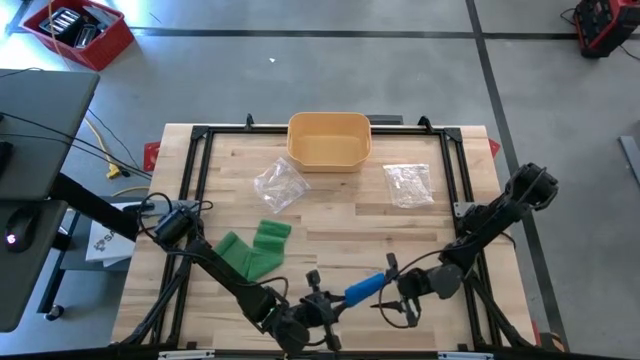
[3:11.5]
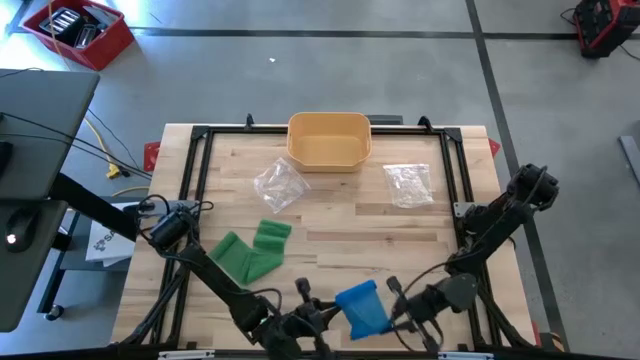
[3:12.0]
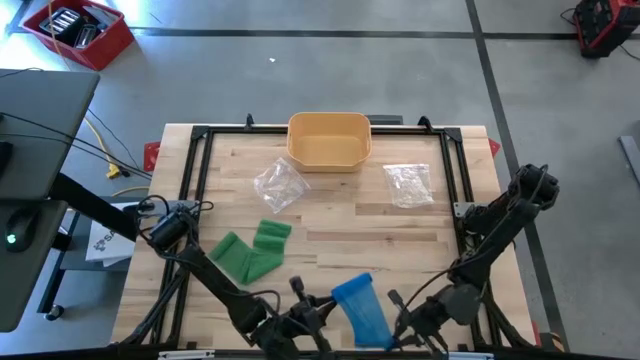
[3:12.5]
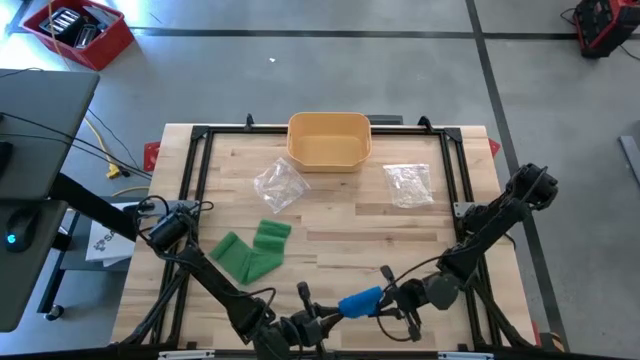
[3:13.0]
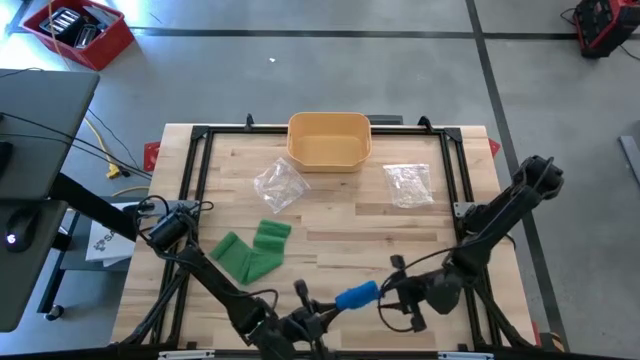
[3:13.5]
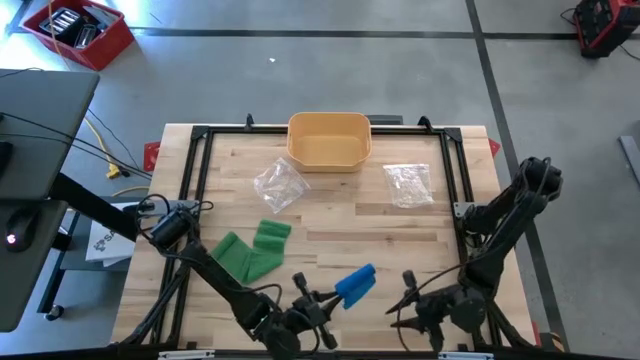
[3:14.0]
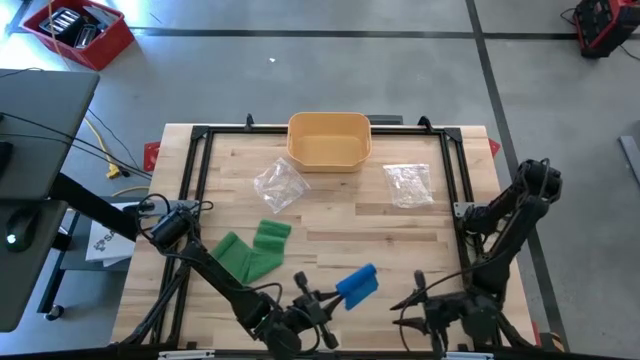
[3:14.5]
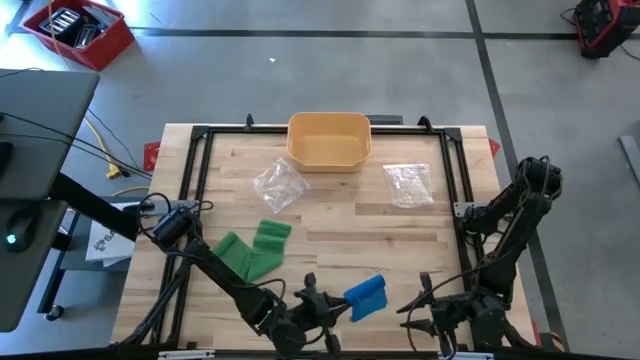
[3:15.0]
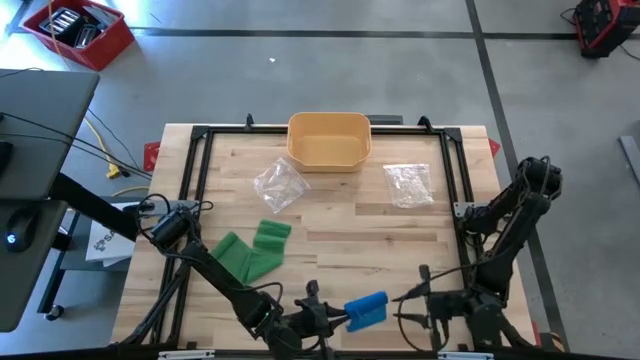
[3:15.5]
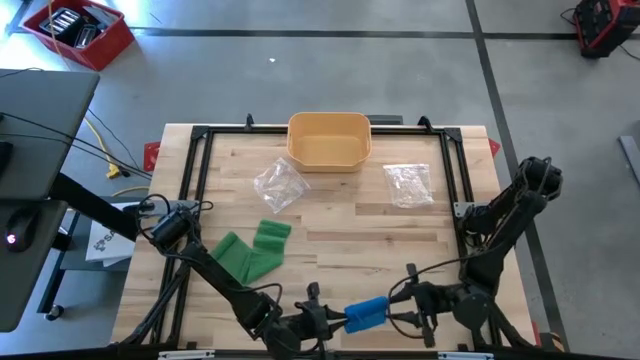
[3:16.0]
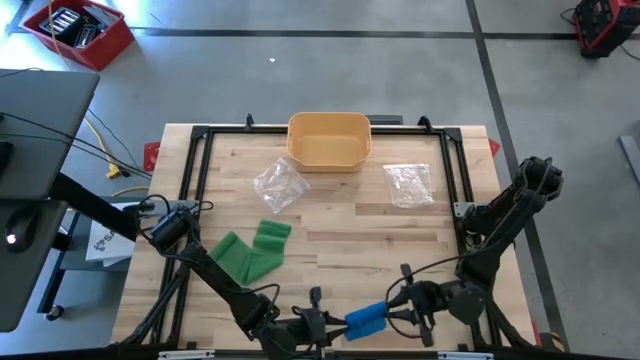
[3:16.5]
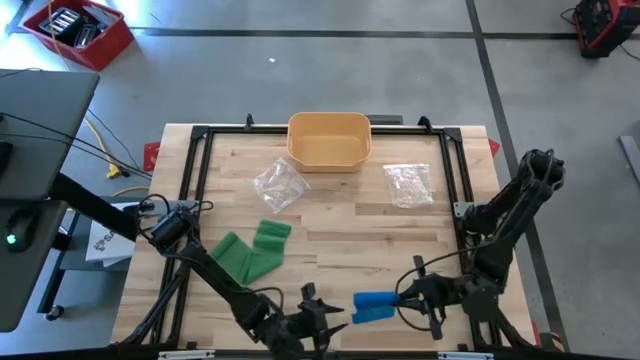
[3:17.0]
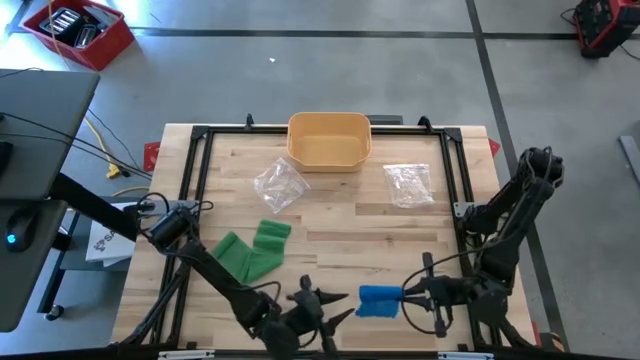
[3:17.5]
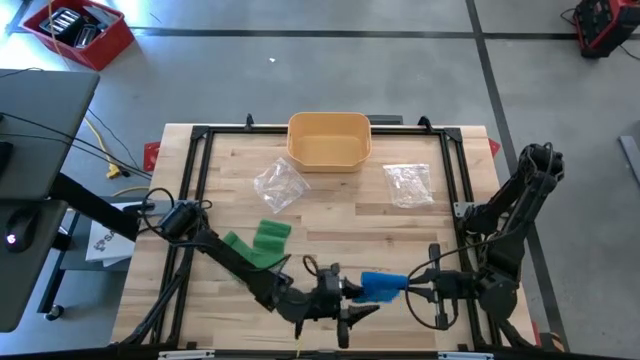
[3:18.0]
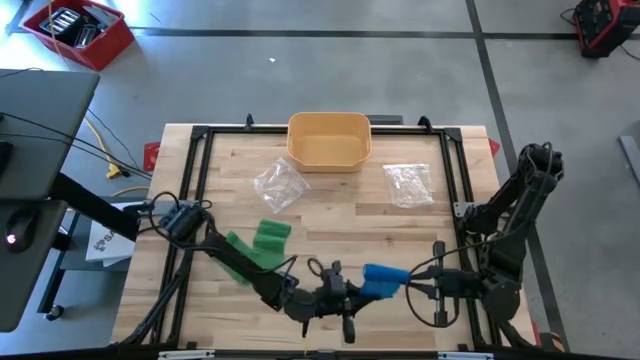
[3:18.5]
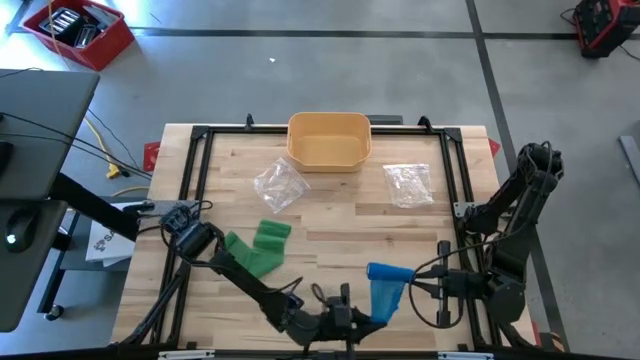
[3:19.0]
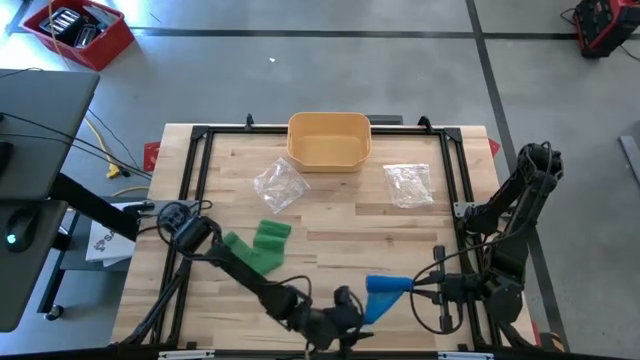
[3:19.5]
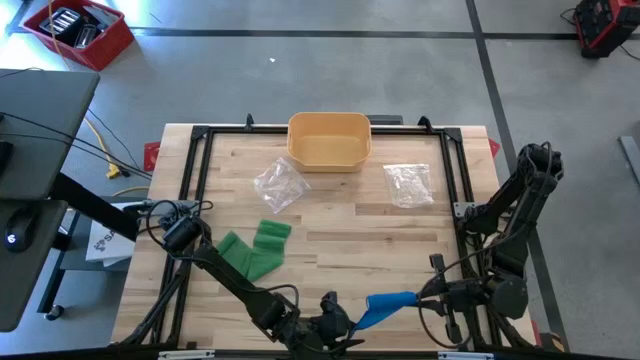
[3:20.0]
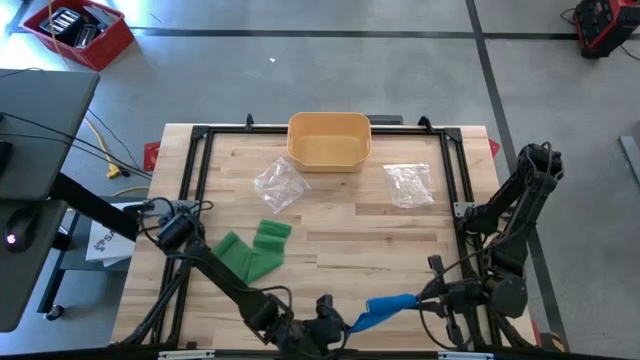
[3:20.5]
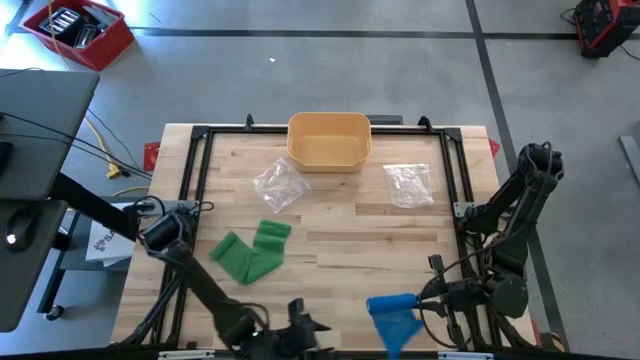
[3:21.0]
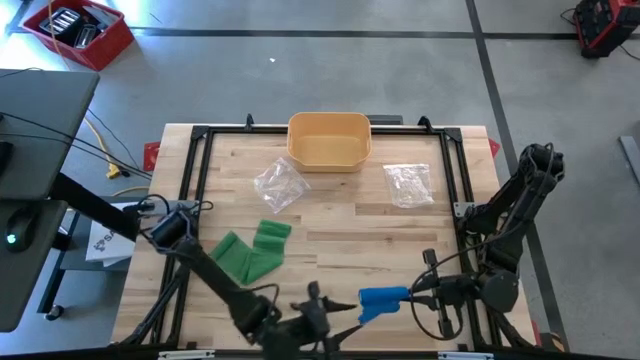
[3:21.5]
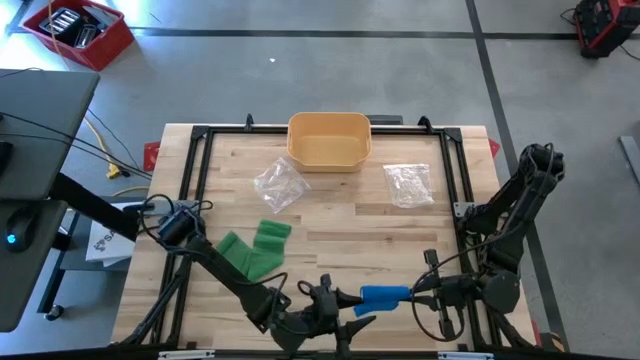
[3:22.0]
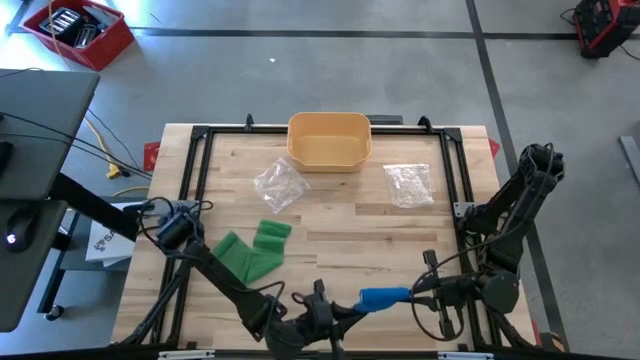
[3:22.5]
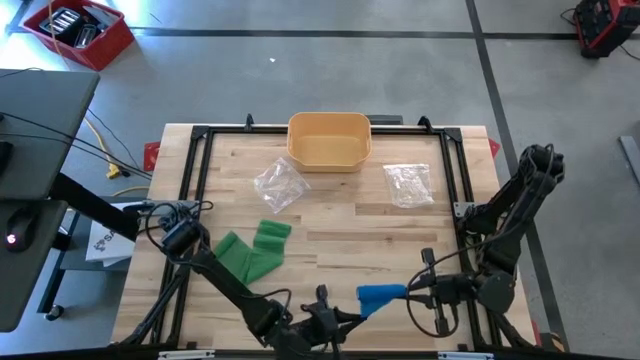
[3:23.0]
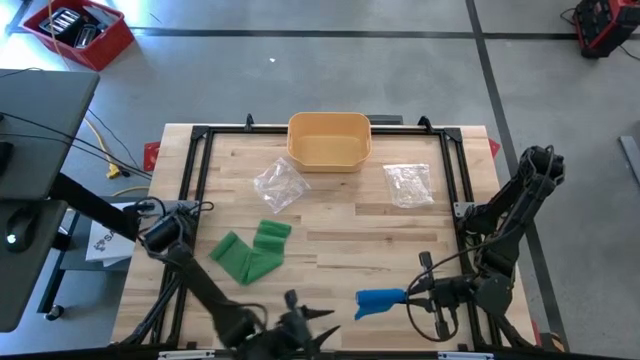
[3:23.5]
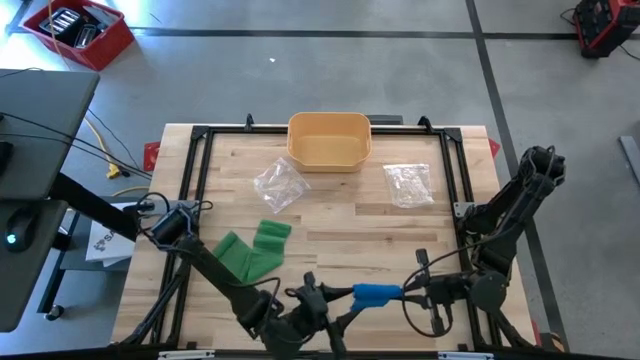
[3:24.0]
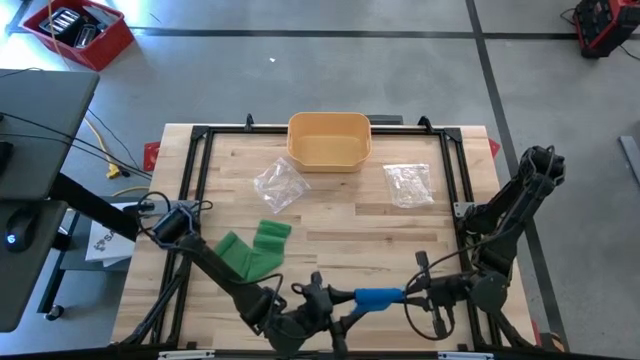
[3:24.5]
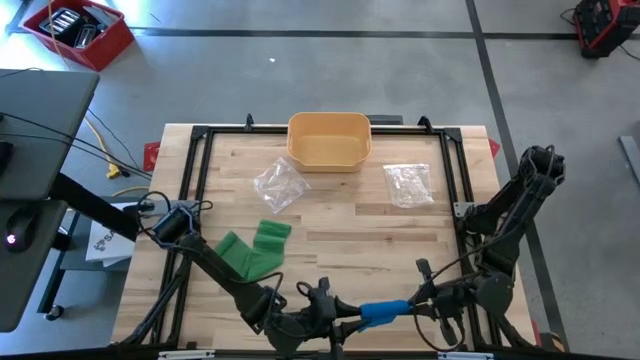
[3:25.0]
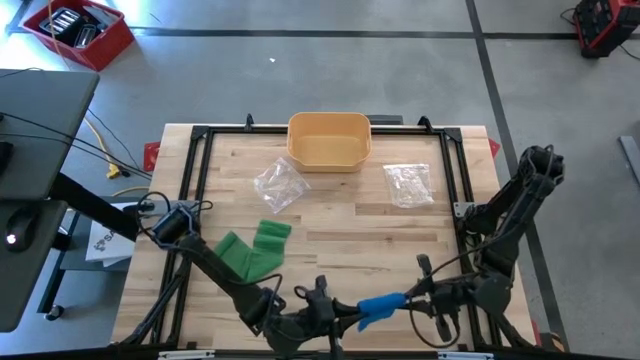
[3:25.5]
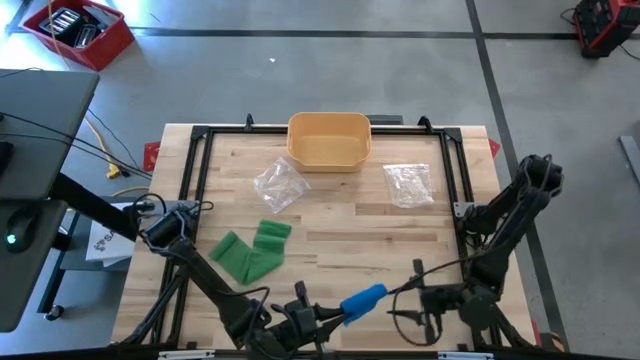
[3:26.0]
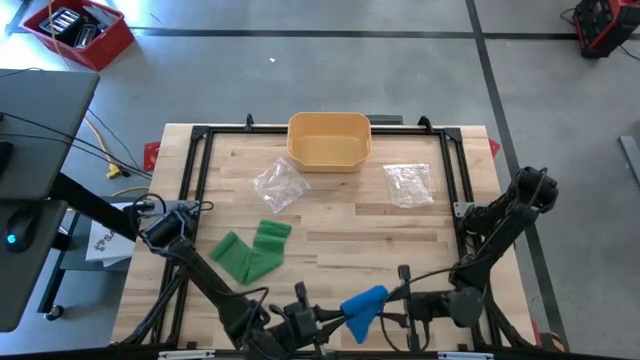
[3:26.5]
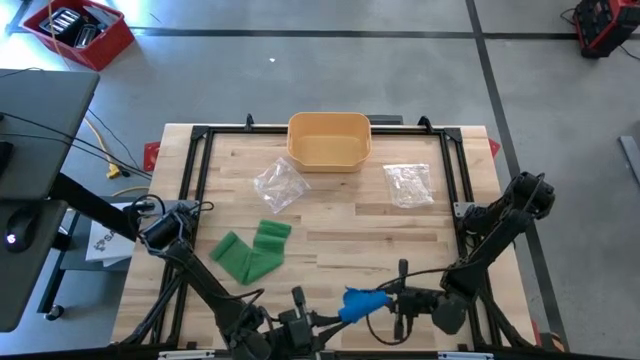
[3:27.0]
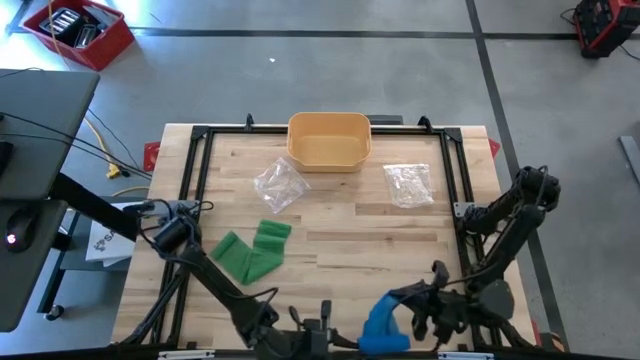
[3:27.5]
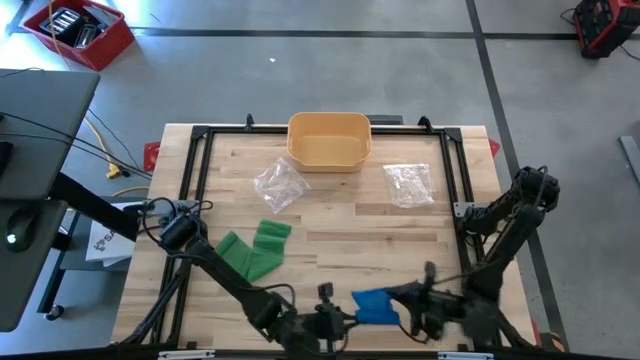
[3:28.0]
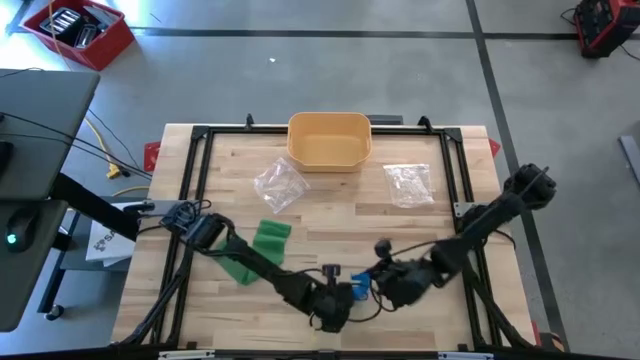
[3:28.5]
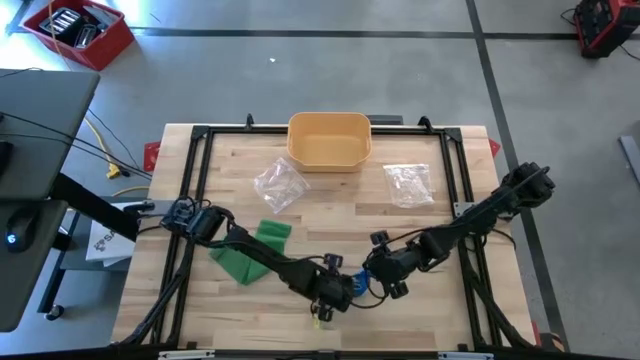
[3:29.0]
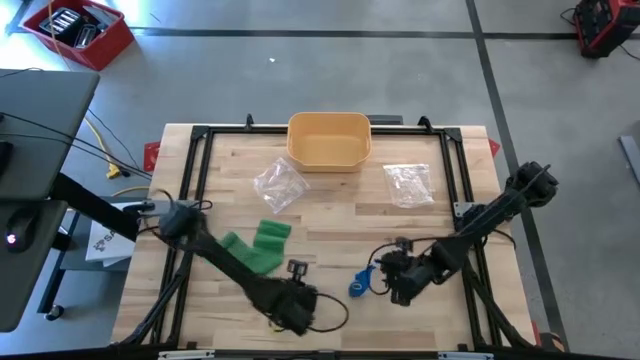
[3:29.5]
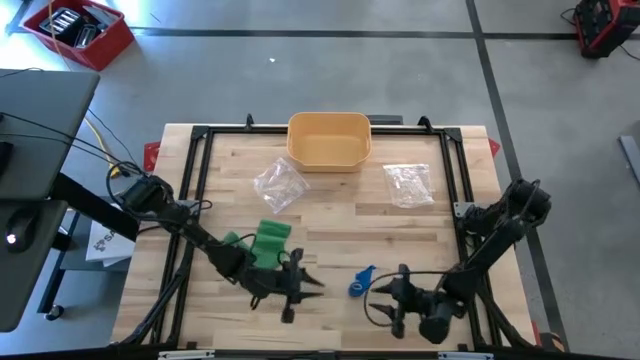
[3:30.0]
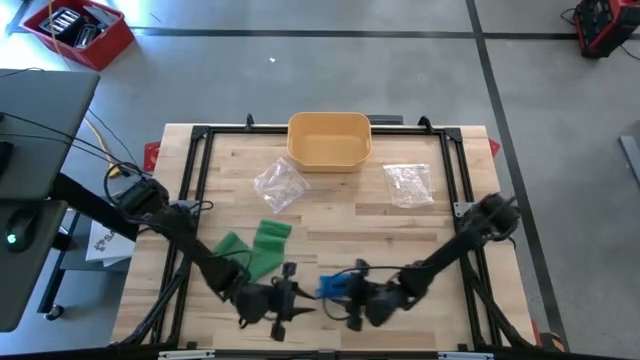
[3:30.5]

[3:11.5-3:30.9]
Task: Roll bandage
Roll the blue bandage

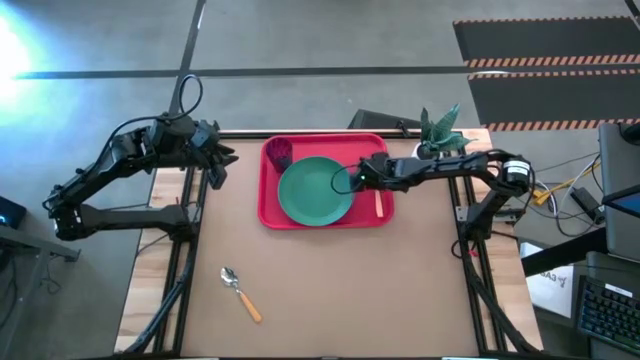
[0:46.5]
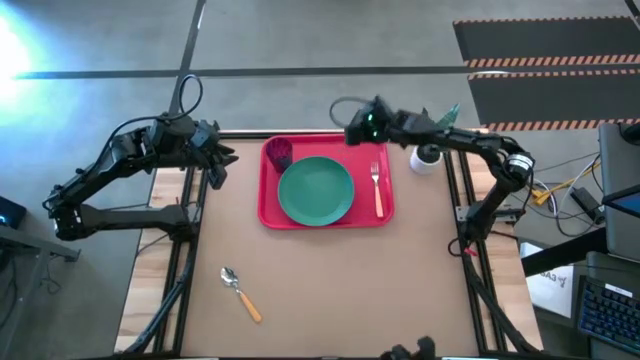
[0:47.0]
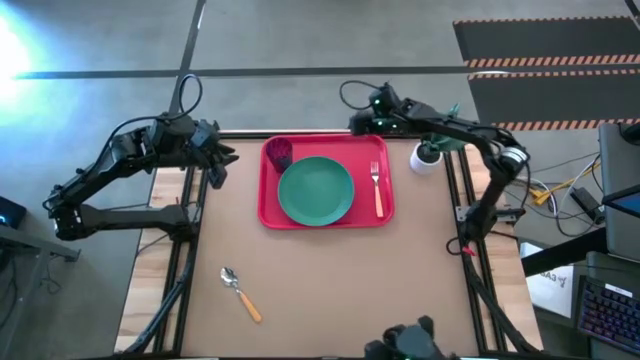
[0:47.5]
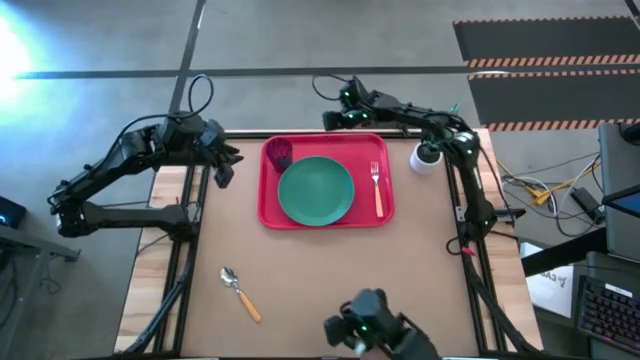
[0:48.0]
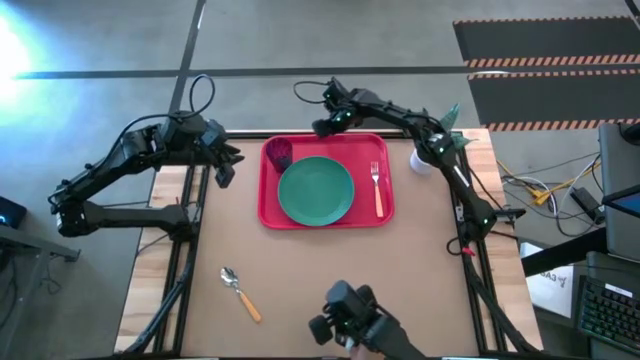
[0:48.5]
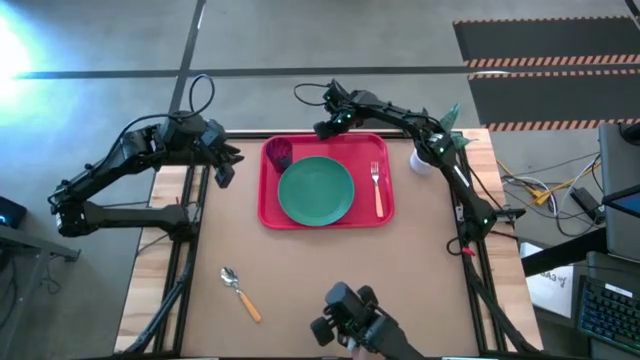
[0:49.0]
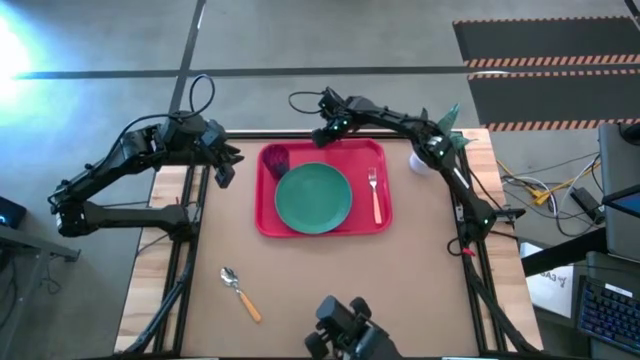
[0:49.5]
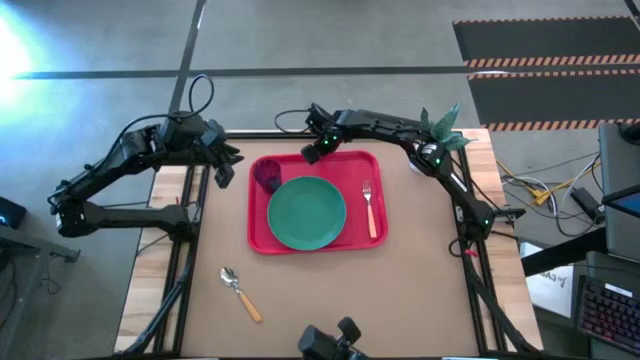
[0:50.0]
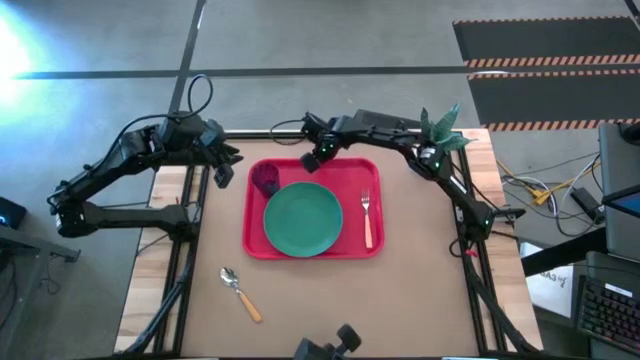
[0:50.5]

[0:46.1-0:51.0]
Task: Pick and place plate/cup/fork/spoon on tray
Move the orange tray to the center of the table
